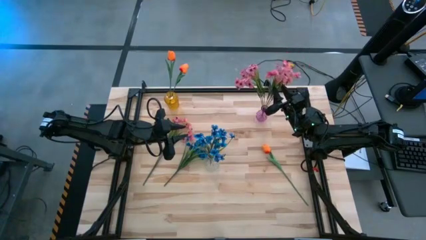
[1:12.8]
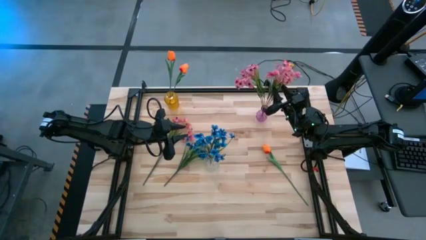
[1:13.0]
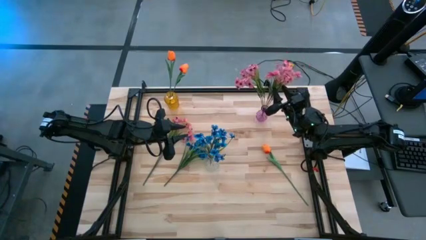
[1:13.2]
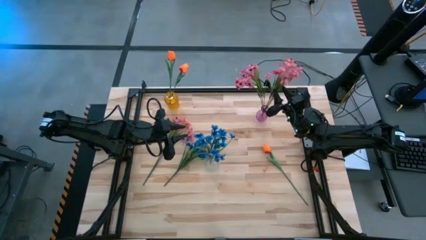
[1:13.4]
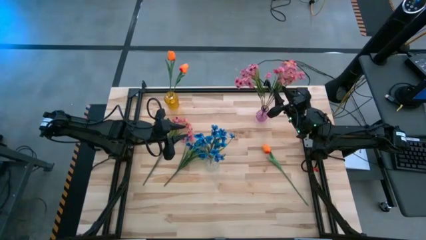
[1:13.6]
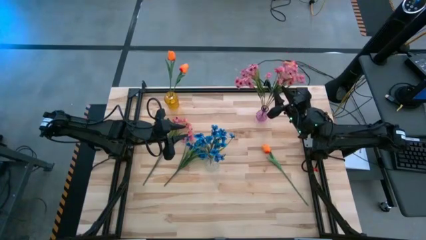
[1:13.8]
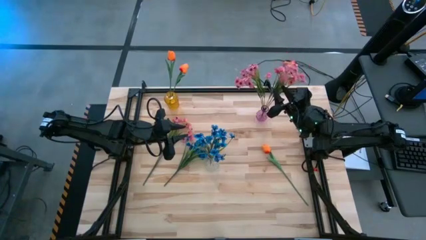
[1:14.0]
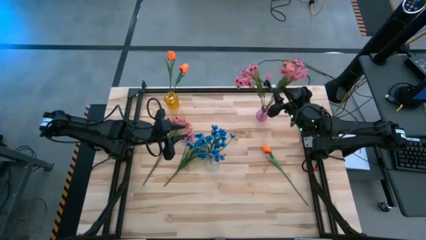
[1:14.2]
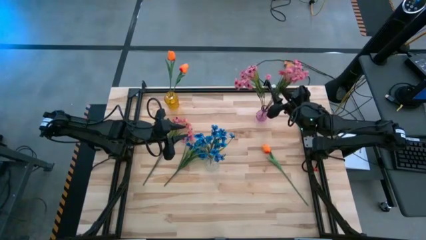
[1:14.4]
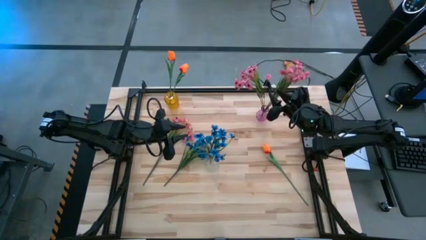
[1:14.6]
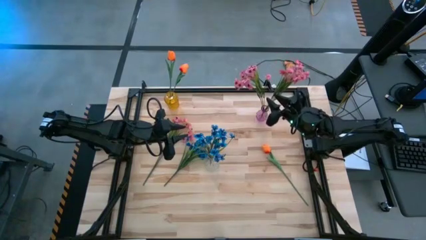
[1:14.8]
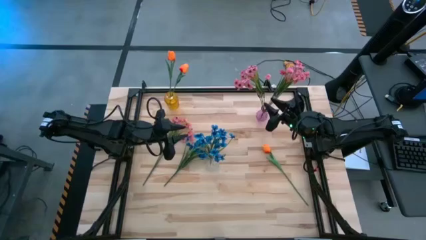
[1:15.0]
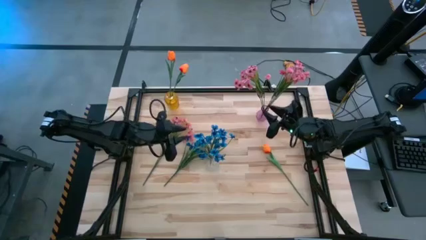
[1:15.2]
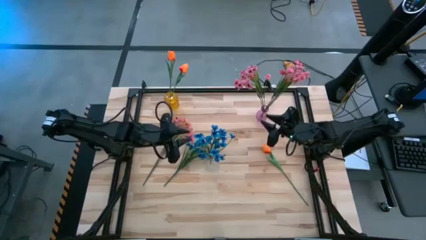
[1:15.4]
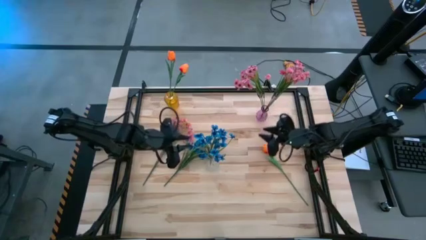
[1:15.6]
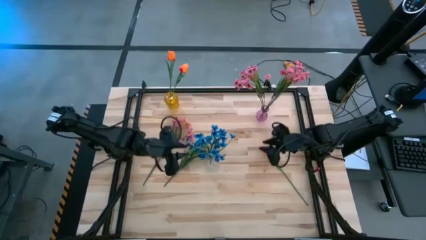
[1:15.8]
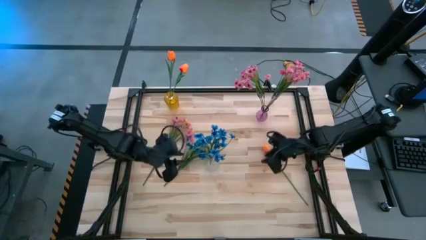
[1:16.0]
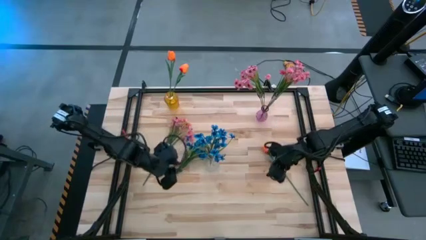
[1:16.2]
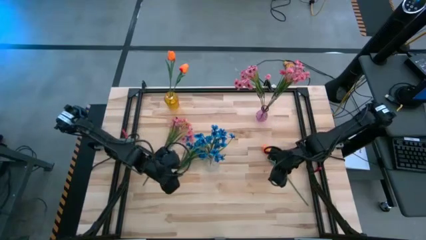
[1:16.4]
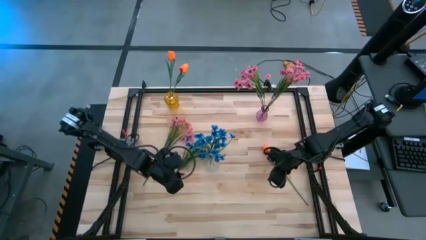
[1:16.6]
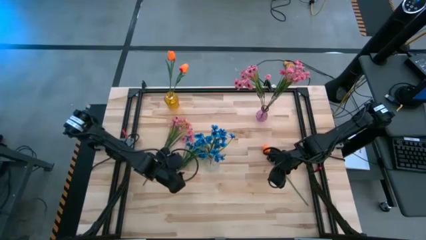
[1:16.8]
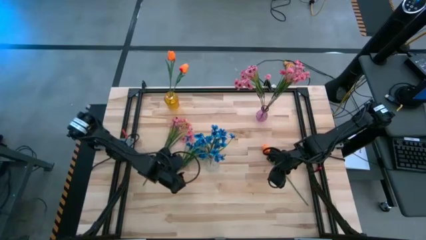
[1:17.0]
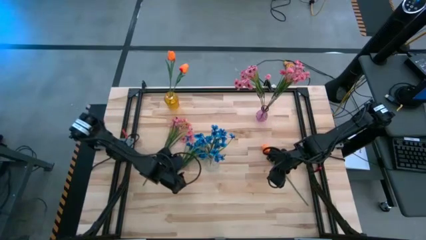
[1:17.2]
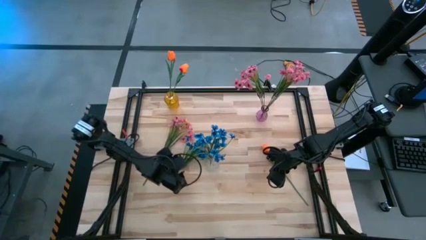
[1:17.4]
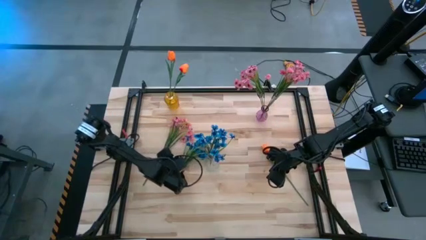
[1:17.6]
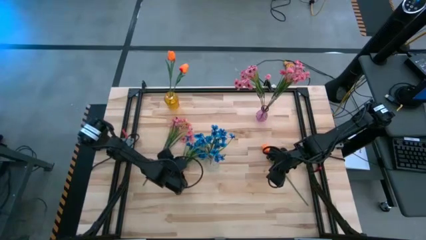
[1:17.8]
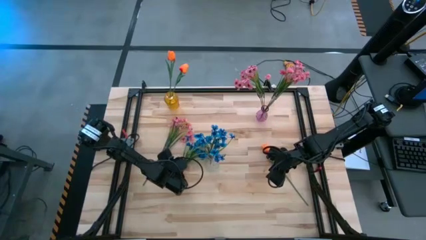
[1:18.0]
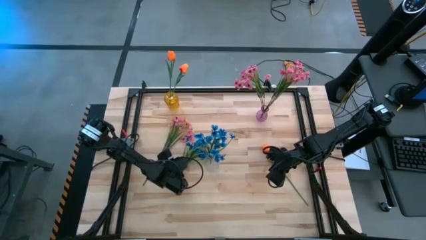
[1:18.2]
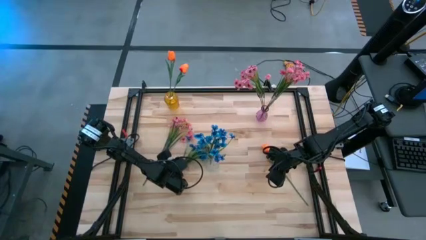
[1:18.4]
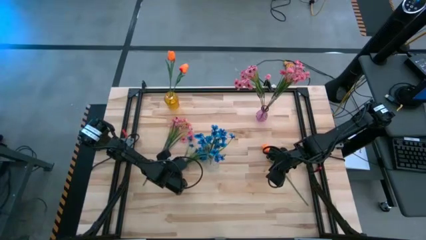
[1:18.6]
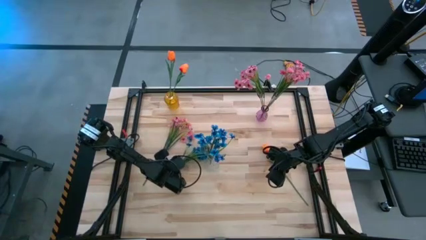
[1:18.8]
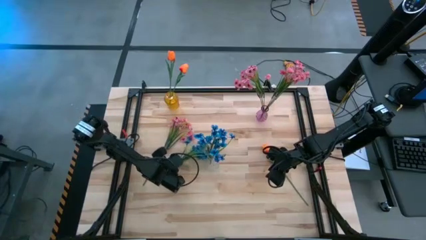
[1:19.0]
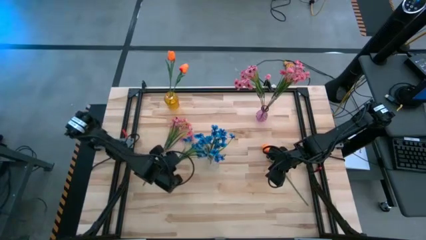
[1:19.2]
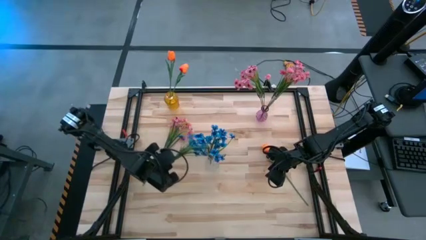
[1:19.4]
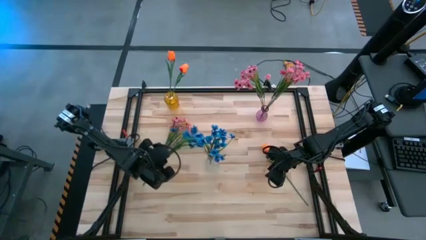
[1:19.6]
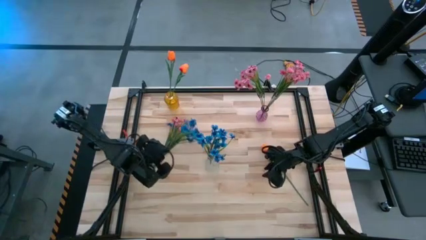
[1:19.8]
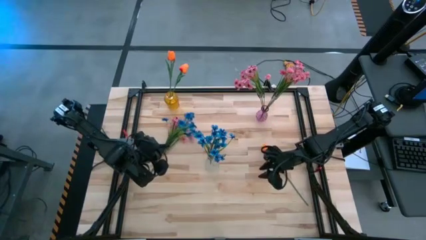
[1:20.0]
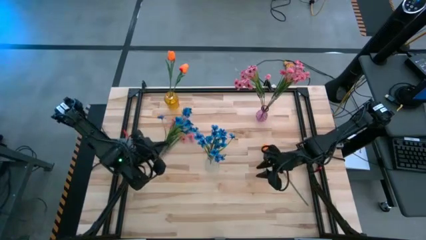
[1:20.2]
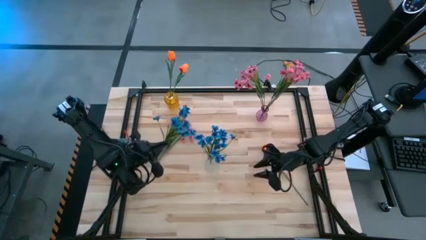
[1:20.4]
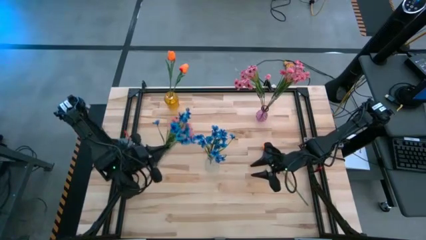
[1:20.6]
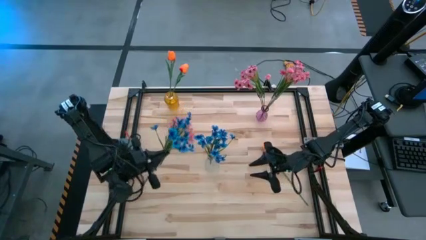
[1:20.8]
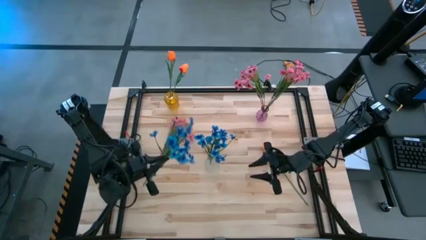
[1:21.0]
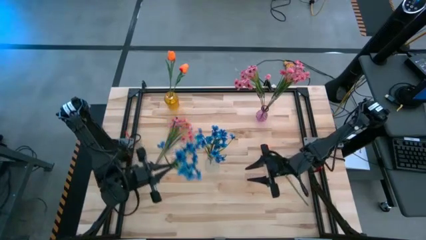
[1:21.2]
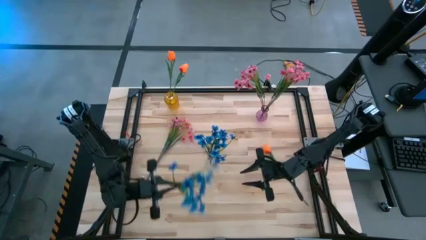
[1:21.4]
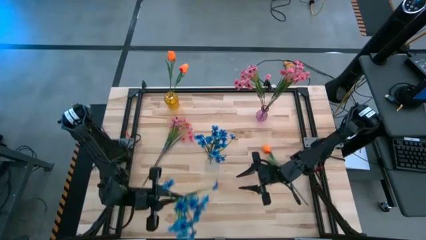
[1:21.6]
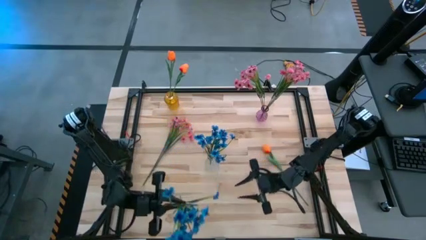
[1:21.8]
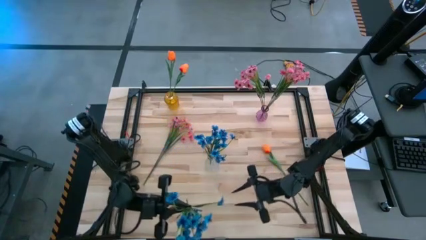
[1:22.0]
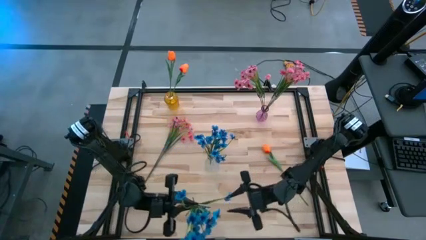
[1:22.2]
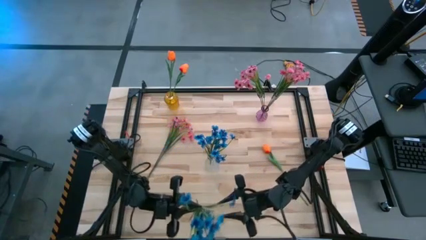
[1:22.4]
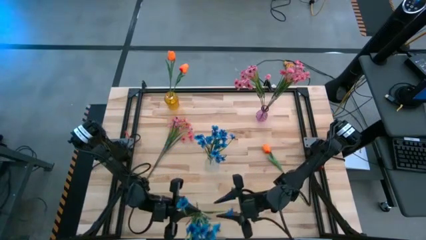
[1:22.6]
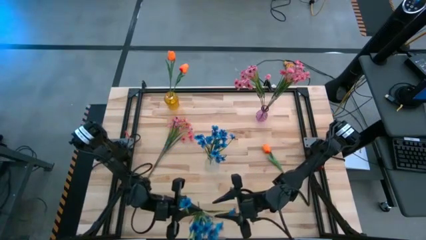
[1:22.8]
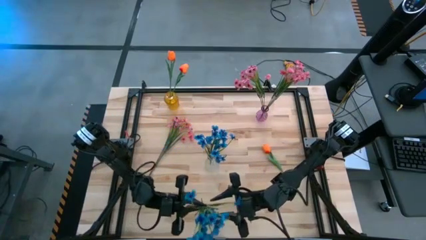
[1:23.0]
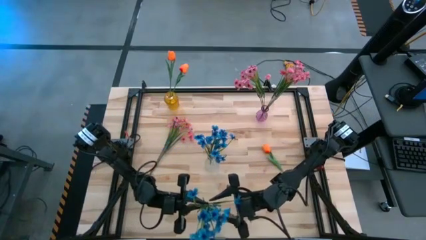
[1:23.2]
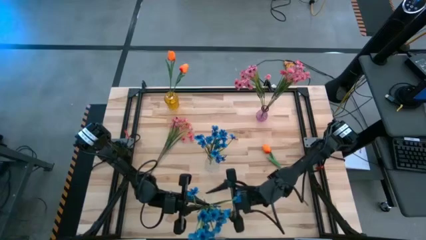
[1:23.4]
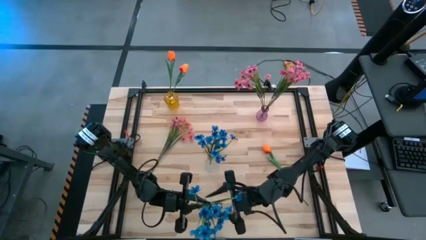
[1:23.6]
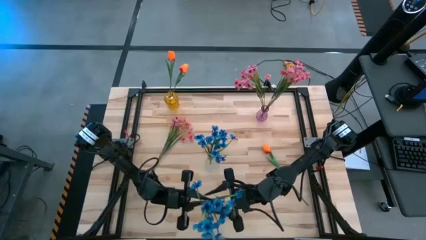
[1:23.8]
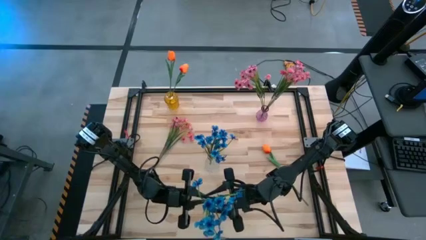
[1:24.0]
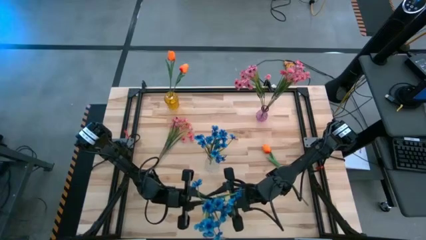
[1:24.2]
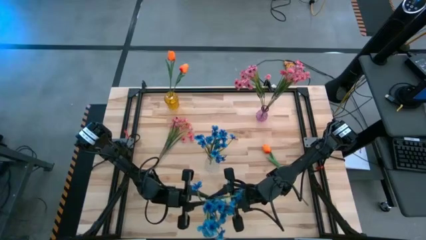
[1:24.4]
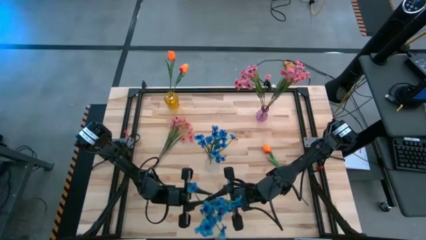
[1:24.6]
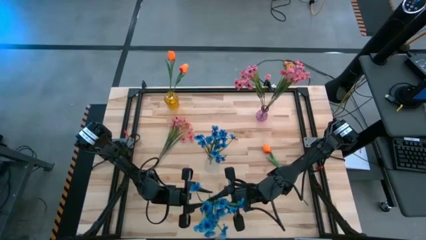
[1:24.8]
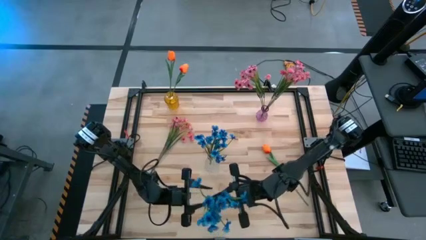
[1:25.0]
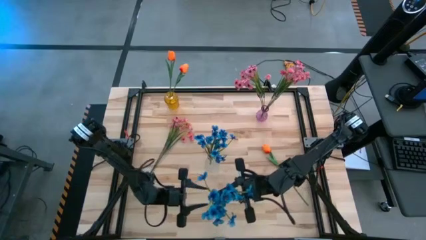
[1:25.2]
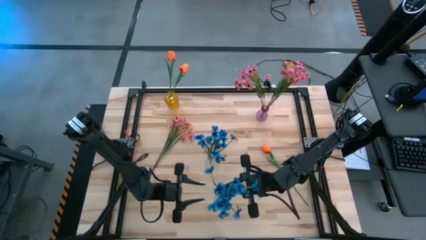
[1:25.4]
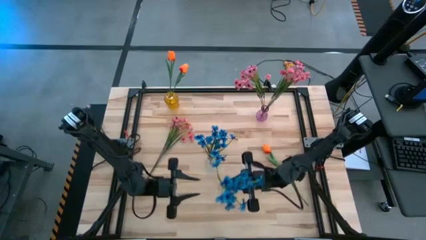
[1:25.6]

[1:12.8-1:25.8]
Task: Sort flowers into vase by color
Put the blue flowers into the transparent vase

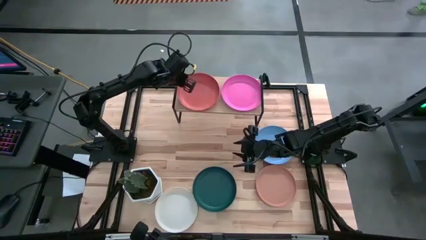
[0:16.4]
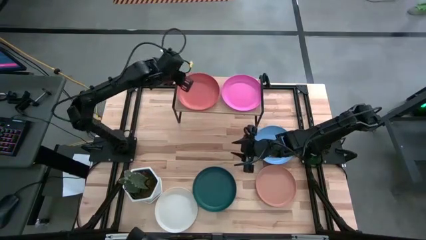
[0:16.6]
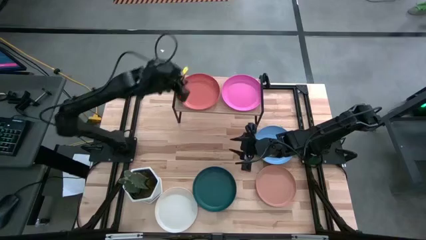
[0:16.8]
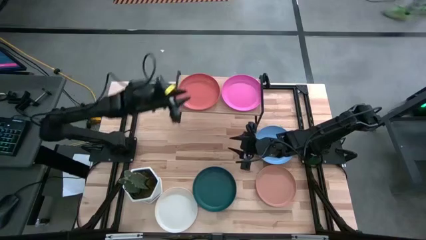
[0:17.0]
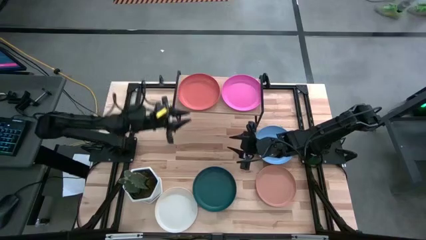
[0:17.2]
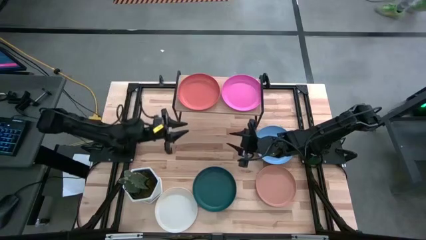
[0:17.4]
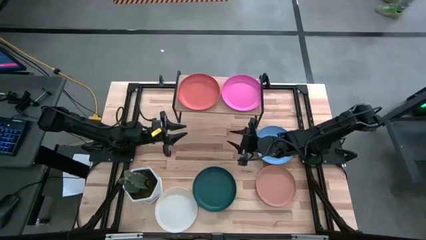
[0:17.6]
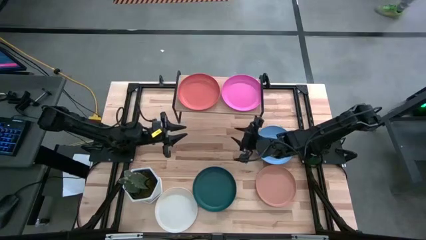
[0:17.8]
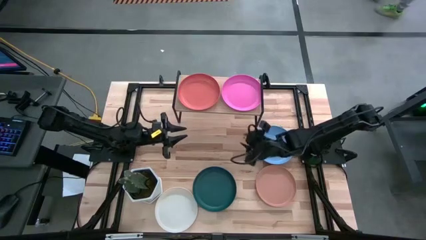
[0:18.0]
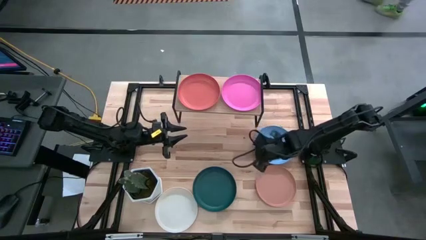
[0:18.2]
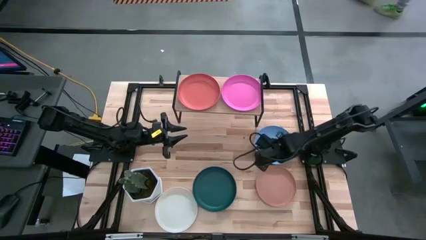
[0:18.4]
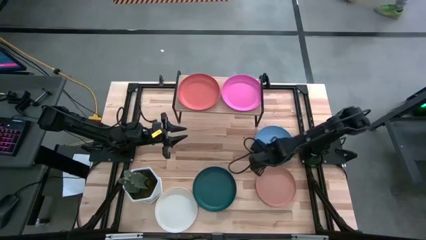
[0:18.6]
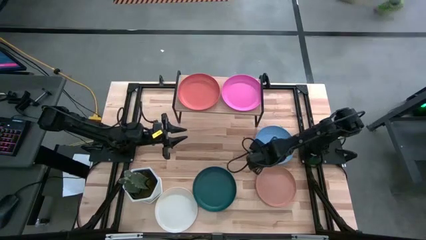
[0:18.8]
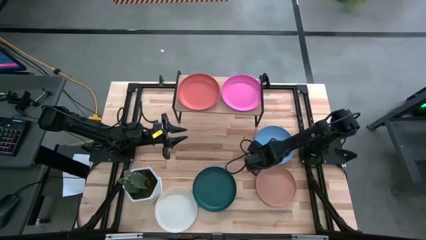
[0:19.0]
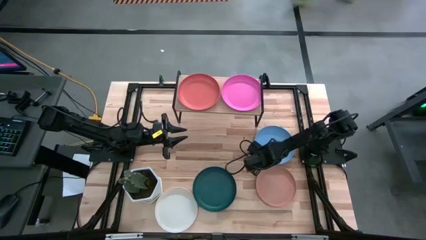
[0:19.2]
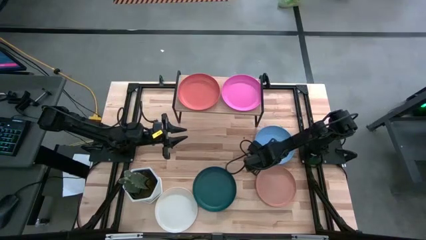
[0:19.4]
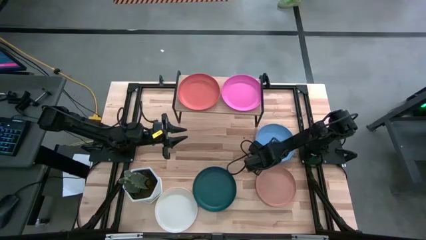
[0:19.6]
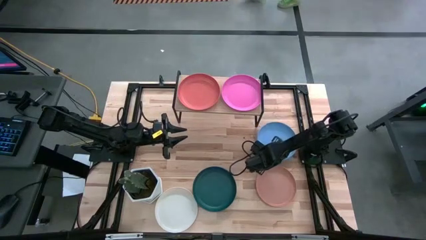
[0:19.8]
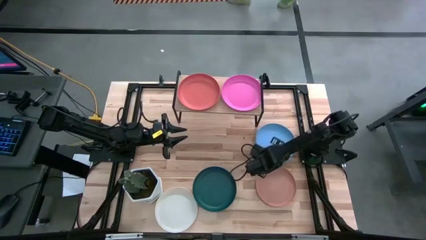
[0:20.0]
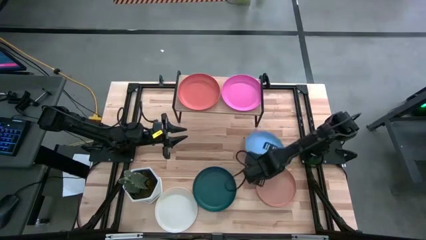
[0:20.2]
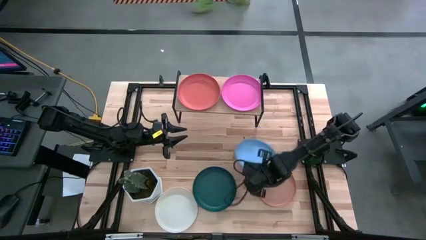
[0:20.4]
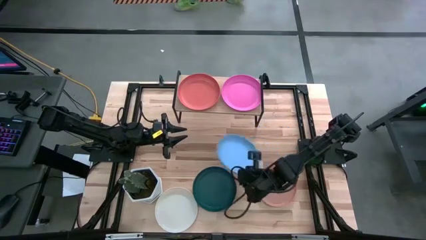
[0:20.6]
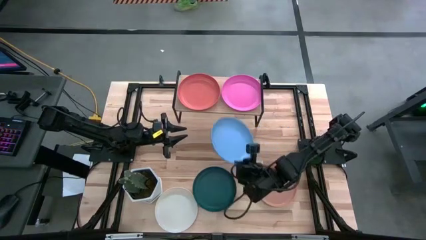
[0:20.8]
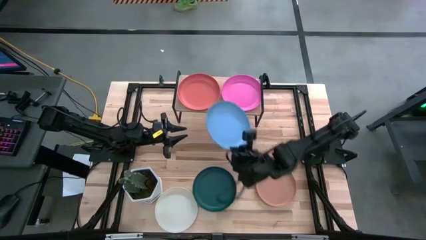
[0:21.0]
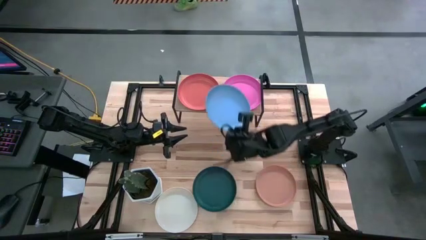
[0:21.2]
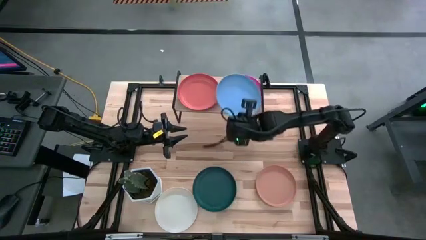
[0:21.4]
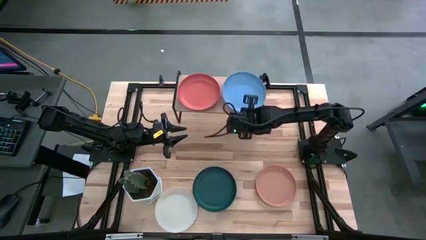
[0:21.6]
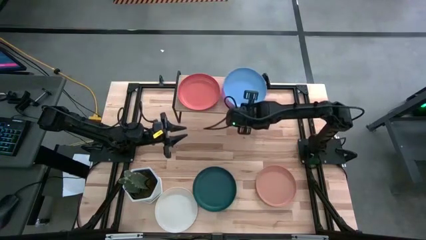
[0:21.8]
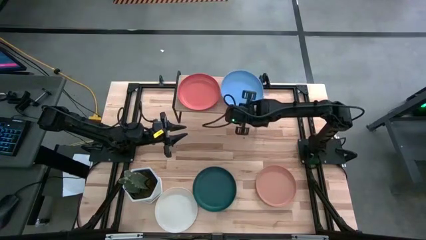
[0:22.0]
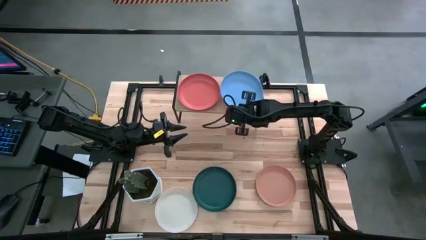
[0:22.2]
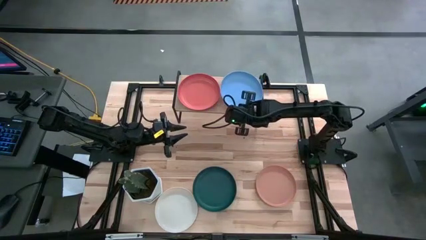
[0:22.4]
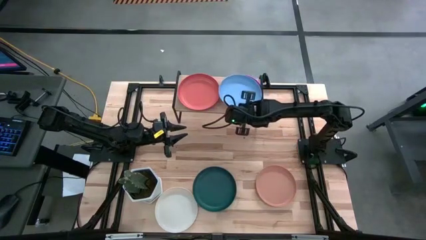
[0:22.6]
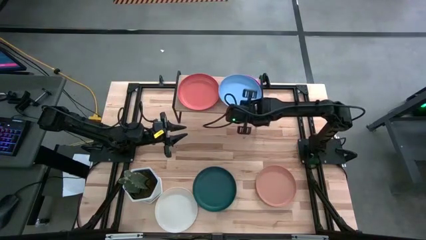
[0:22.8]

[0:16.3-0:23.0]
Task: Place and stack plates onto a shelf
Stack the light blue plate on top of the pink plate on the shelf
